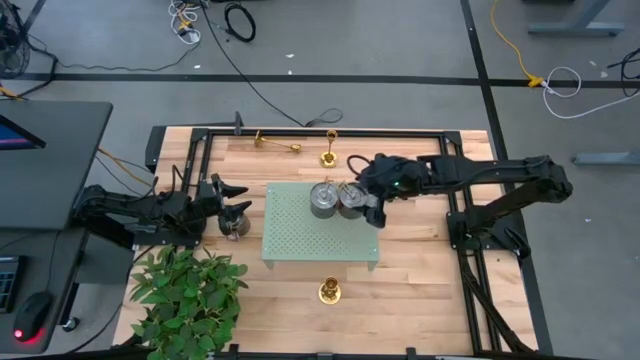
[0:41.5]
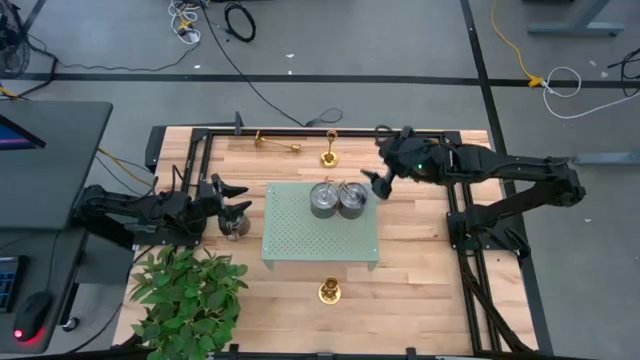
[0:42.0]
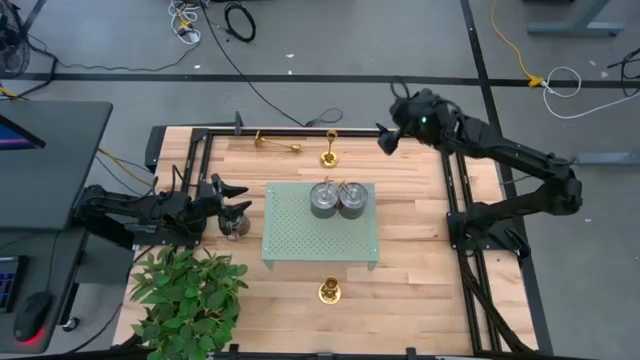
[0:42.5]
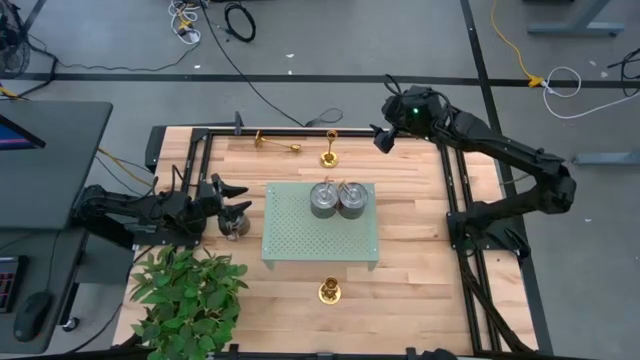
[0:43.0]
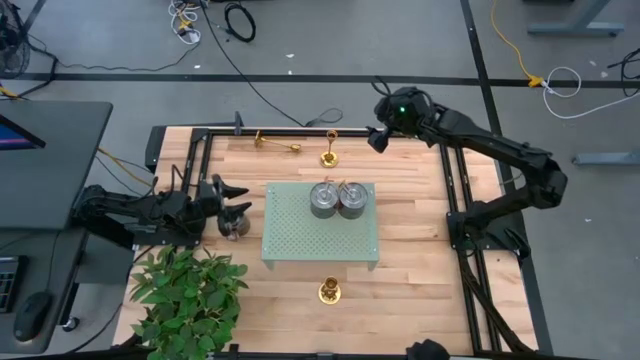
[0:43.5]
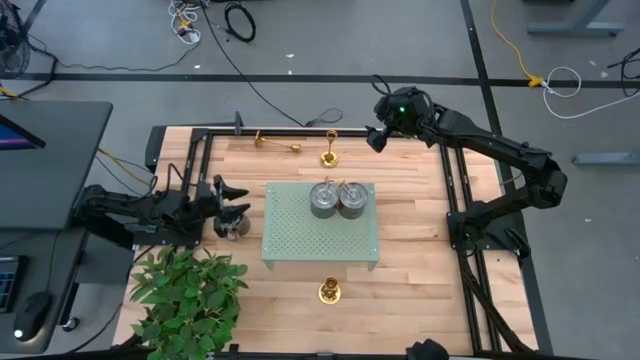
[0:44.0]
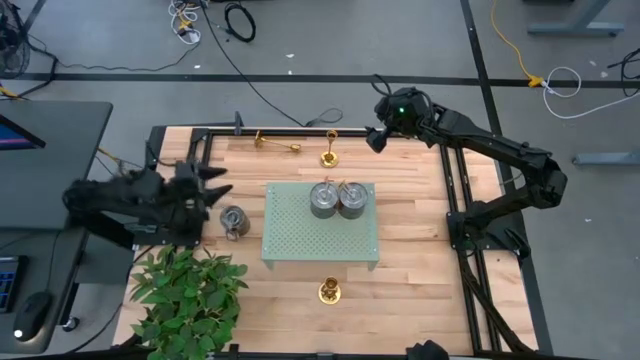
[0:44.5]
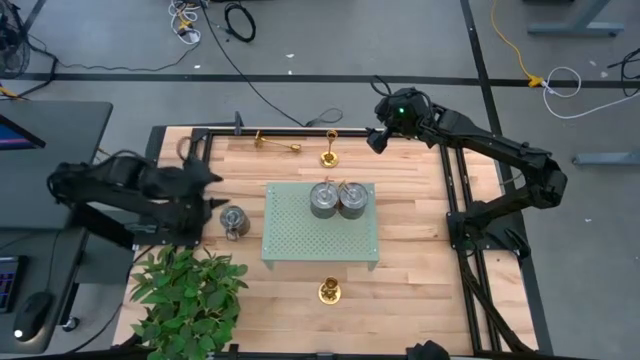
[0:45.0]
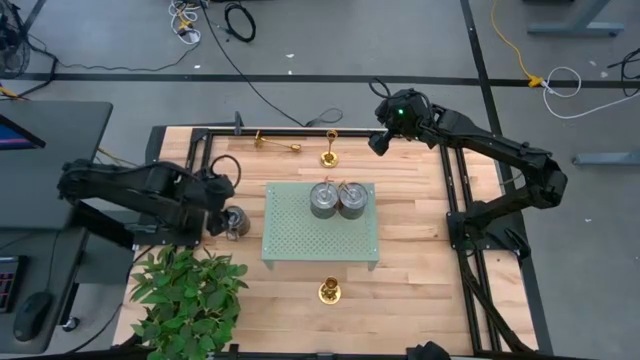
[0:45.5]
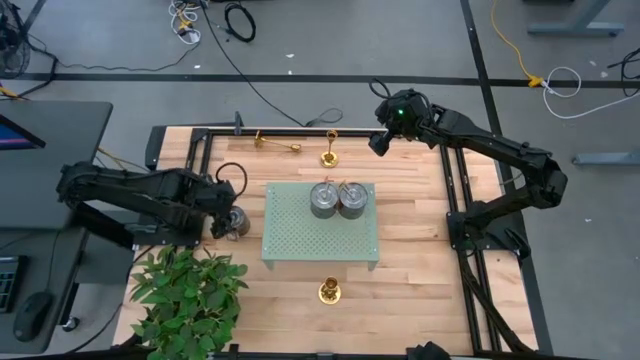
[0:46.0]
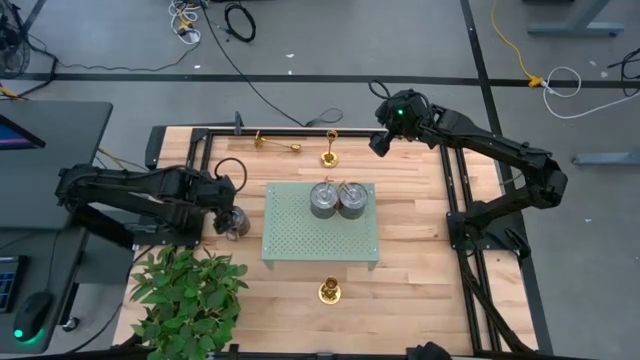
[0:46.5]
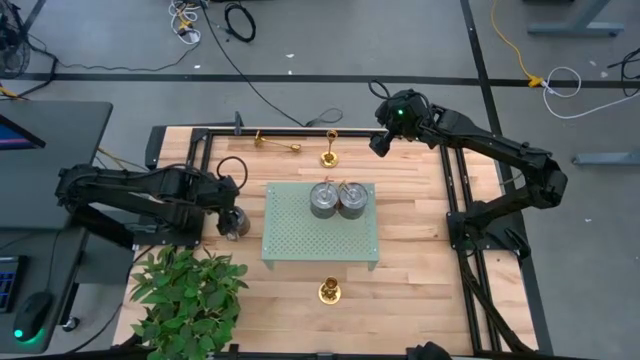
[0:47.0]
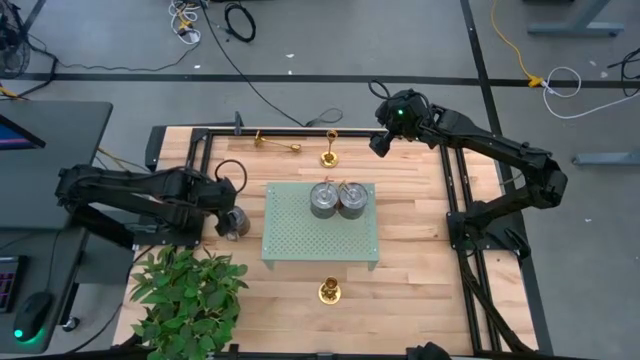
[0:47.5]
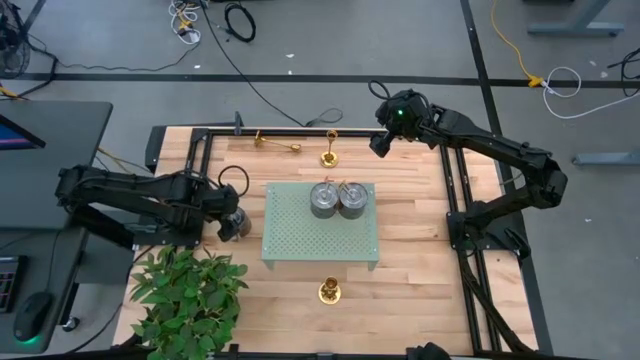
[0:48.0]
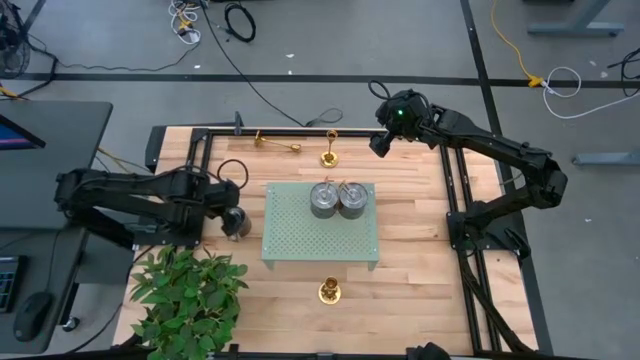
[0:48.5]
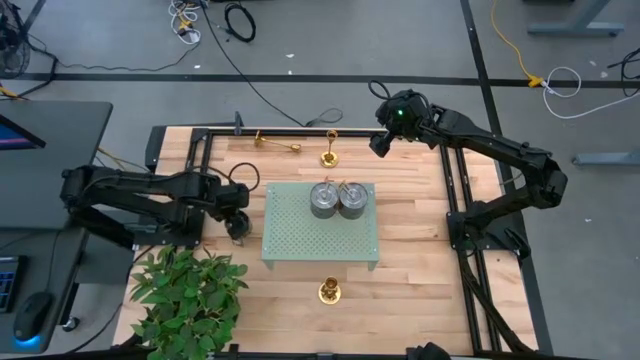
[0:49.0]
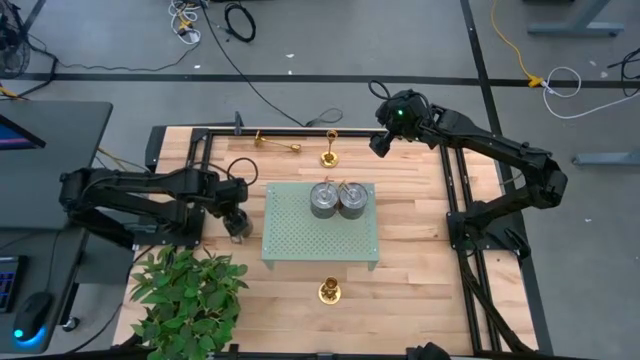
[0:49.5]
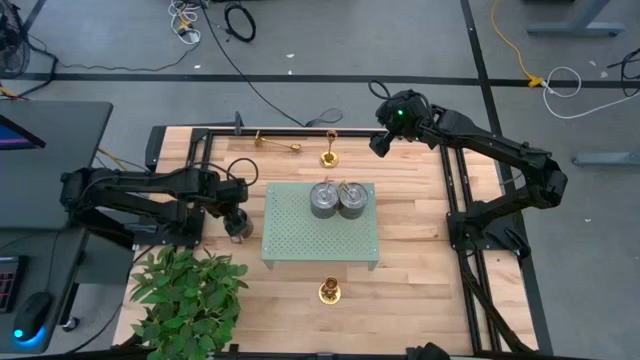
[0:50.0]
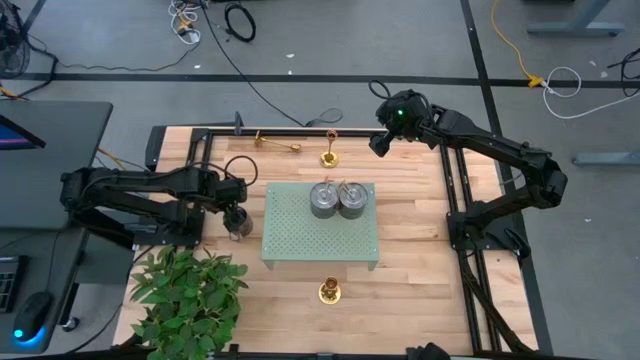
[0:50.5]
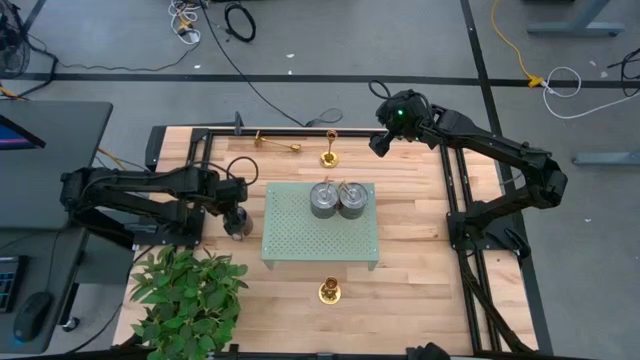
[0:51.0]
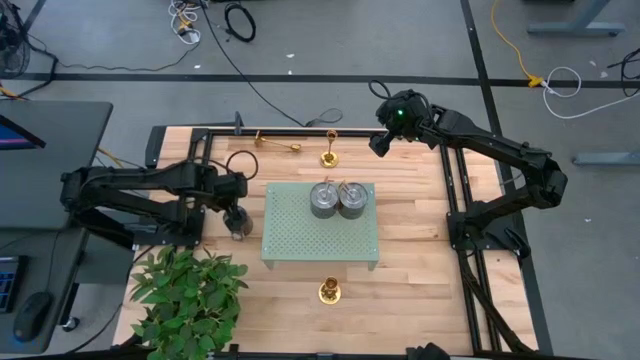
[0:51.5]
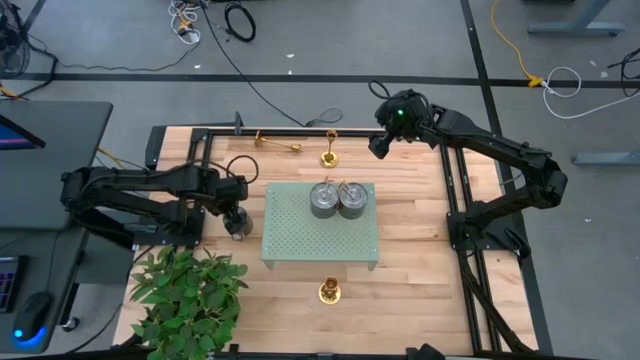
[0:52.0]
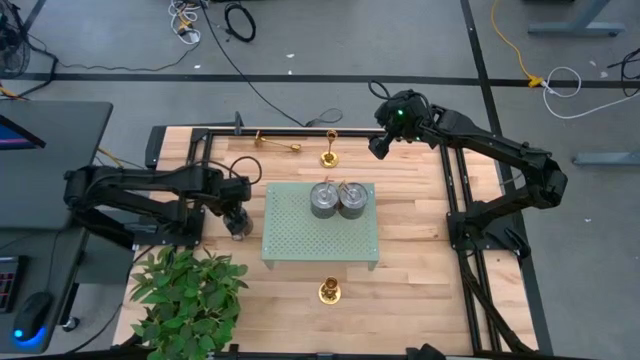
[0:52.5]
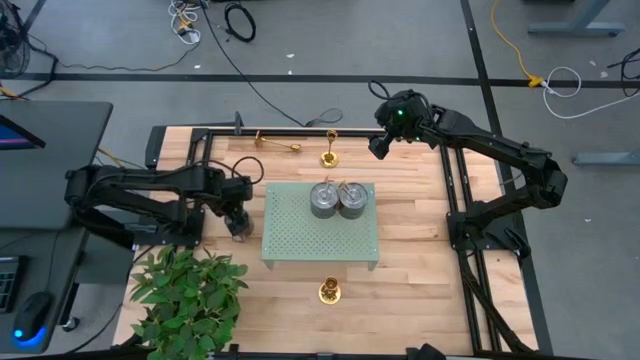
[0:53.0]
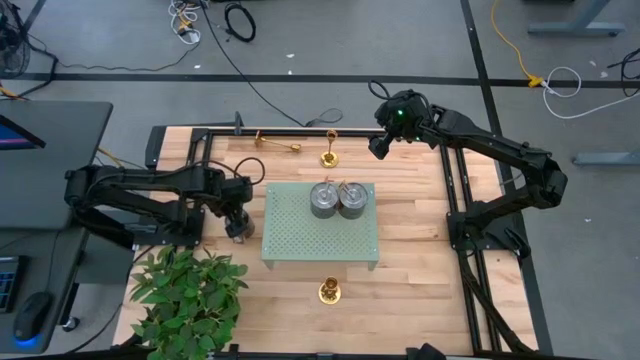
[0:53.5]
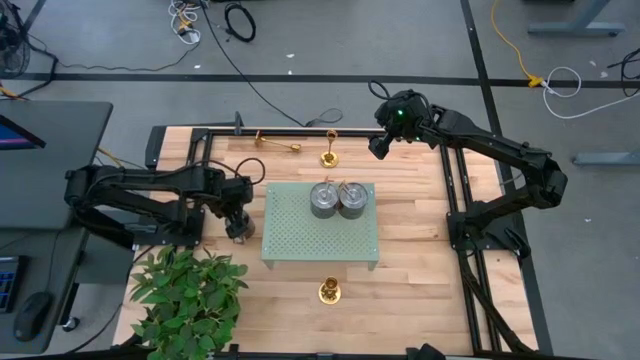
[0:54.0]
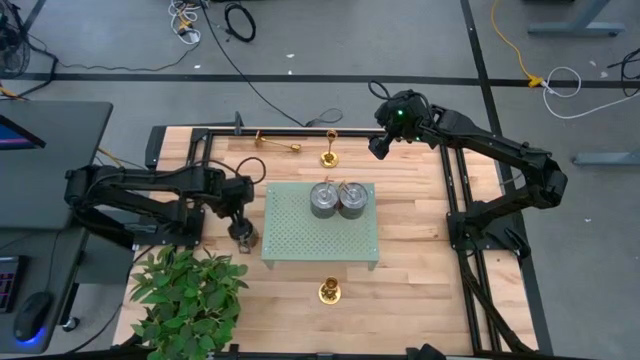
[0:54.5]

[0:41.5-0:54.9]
Task: Pick & Place candle stick holders
Put the orange scented candle on the shelf

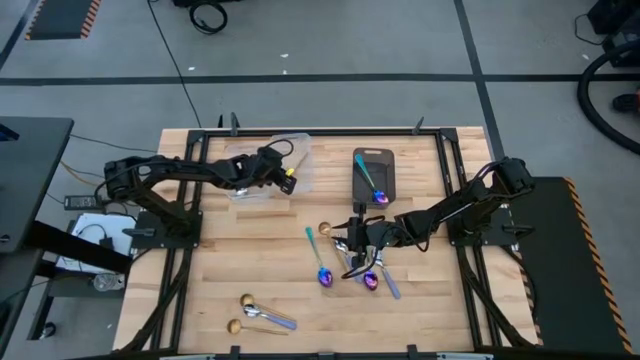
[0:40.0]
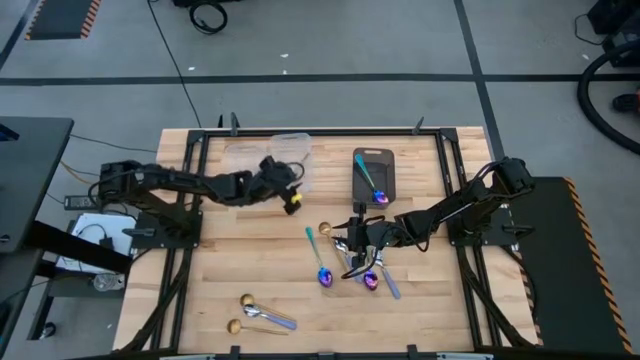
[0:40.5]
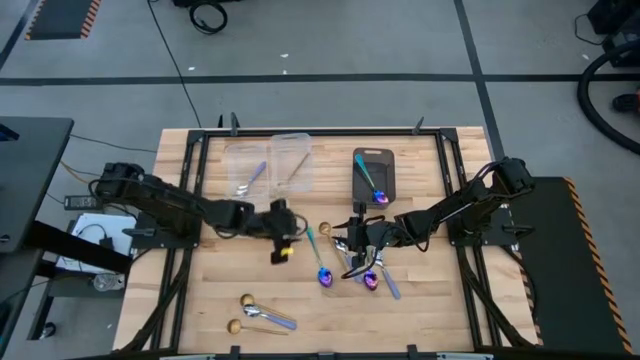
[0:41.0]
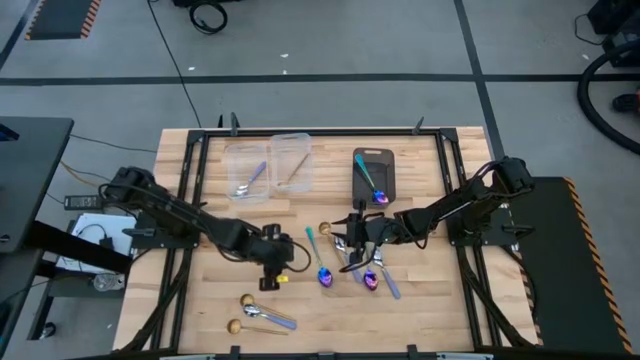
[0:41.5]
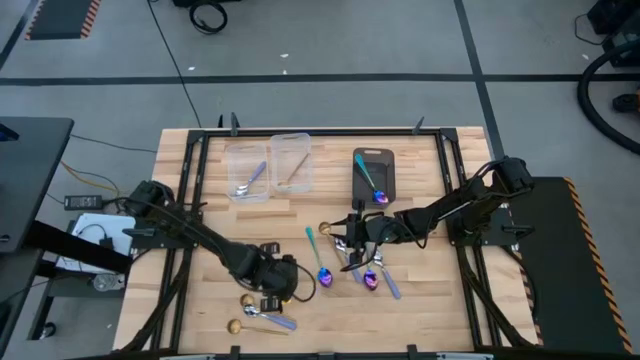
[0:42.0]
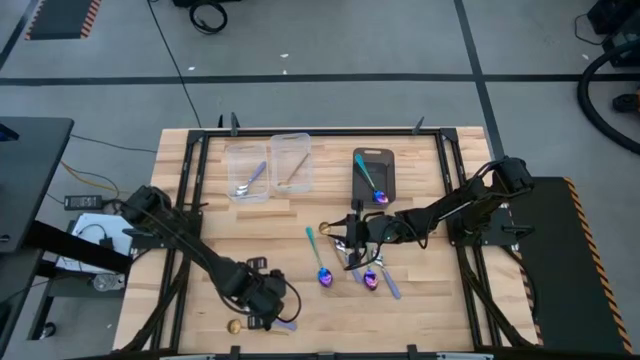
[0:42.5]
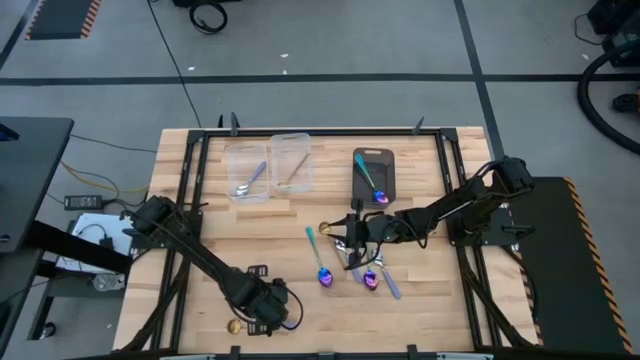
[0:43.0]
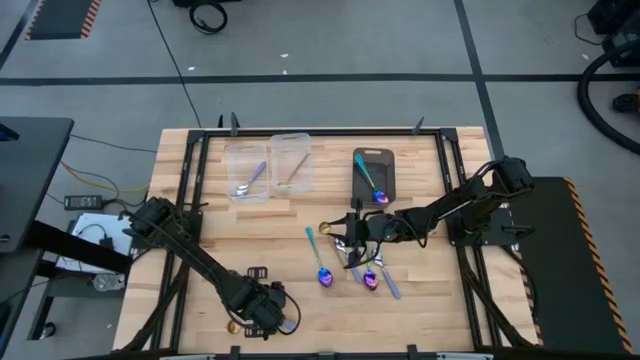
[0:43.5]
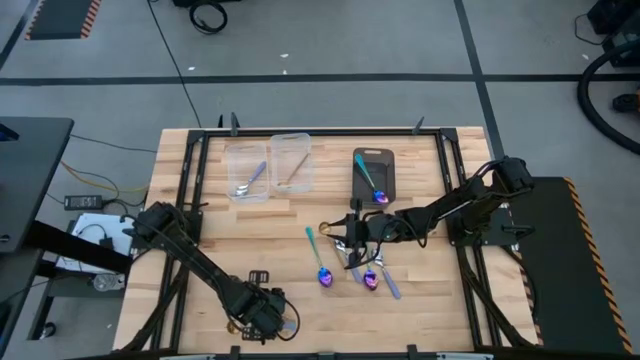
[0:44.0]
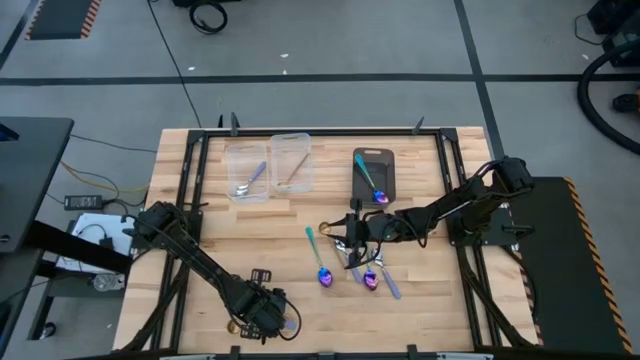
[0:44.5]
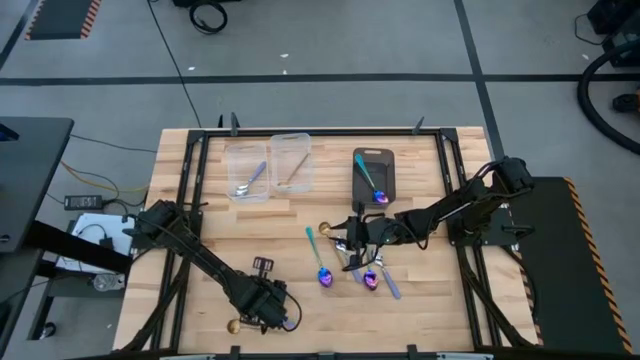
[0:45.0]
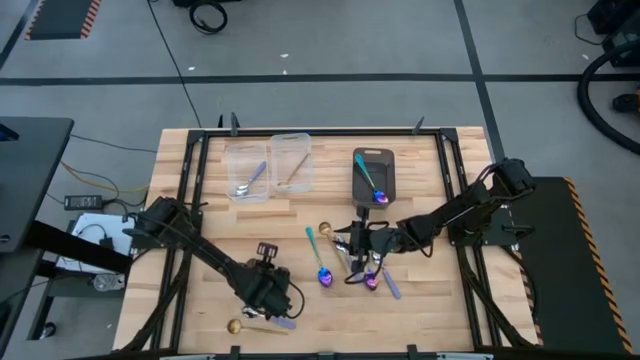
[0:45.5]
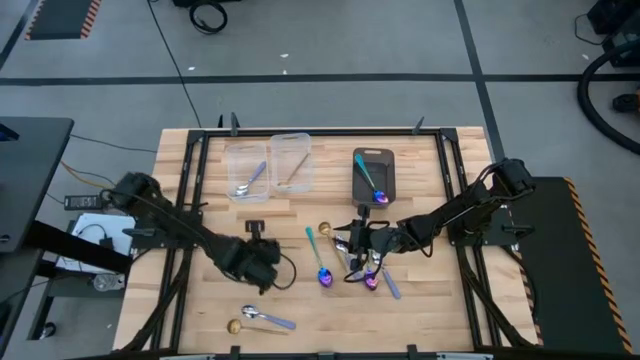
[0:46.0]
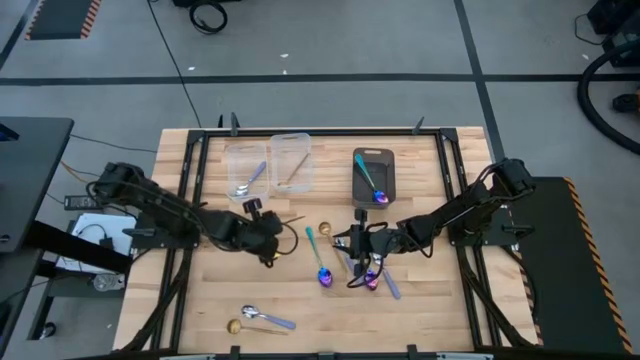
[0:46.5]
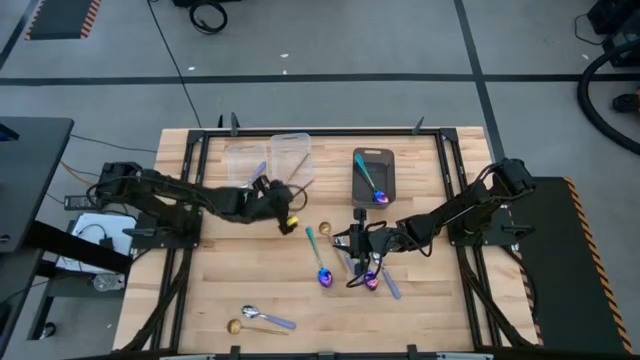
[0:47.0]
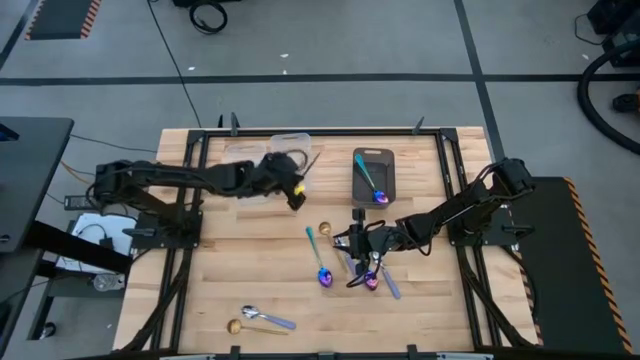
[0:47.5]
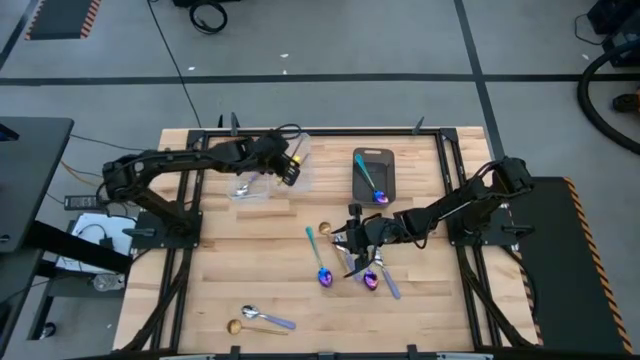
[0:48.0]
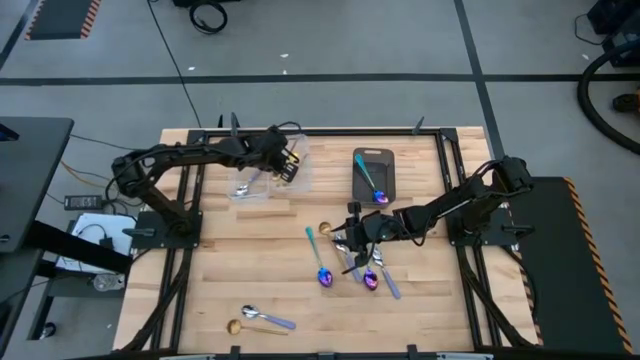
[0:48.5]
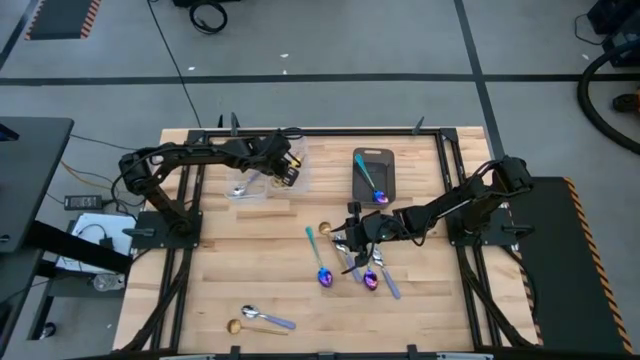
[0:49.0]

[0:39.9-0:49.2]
Task: Sort silverware by color (type)
Put the gold spoon into the right transparent bin
